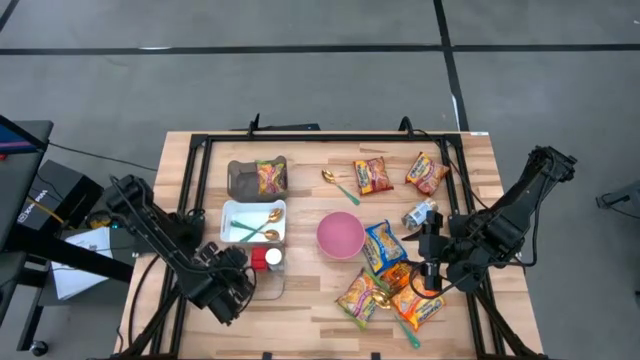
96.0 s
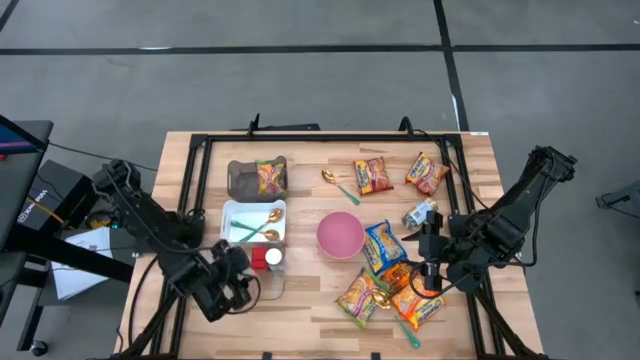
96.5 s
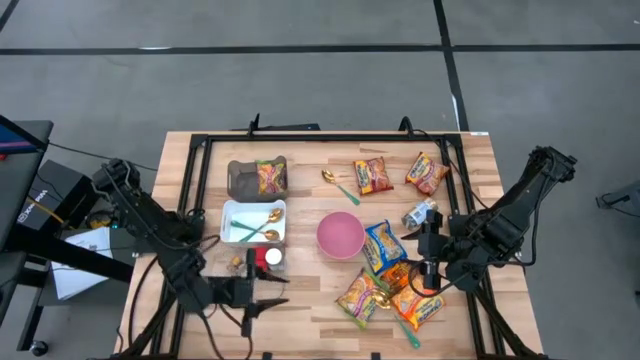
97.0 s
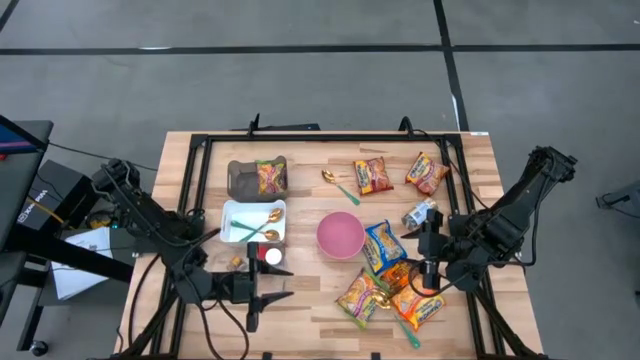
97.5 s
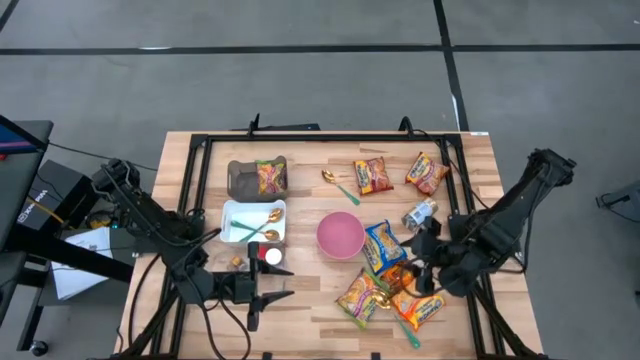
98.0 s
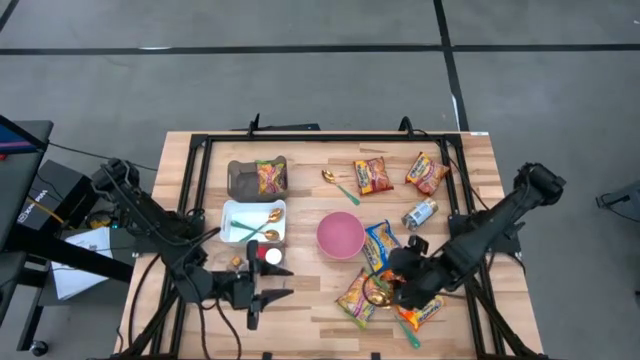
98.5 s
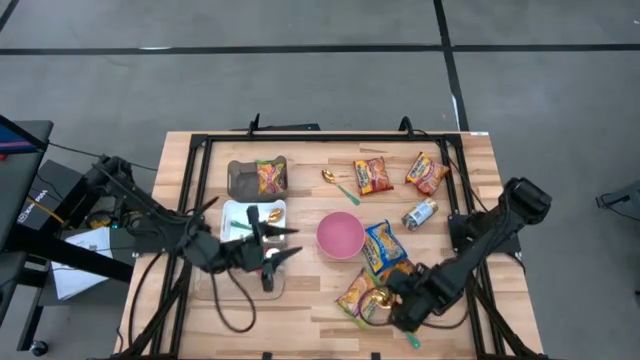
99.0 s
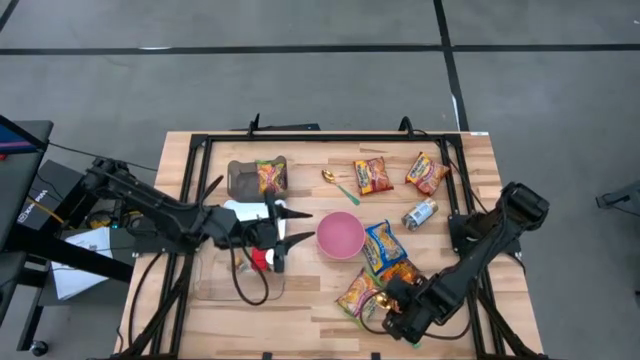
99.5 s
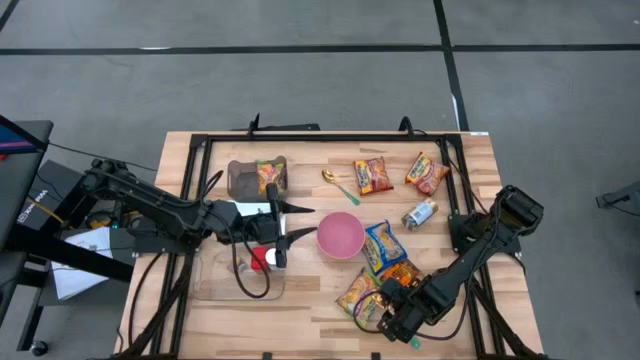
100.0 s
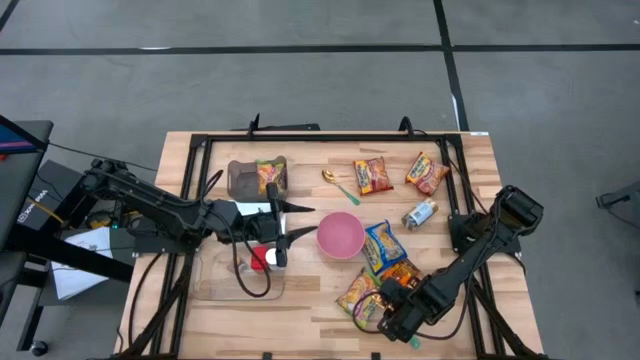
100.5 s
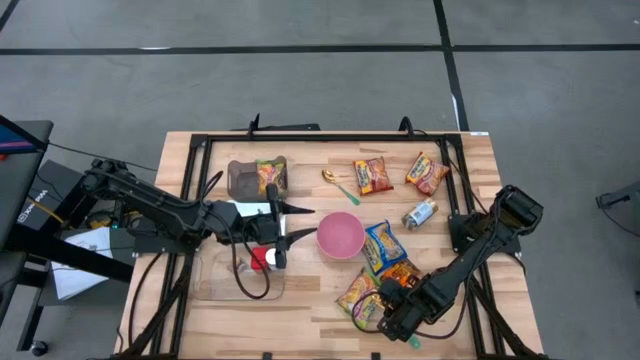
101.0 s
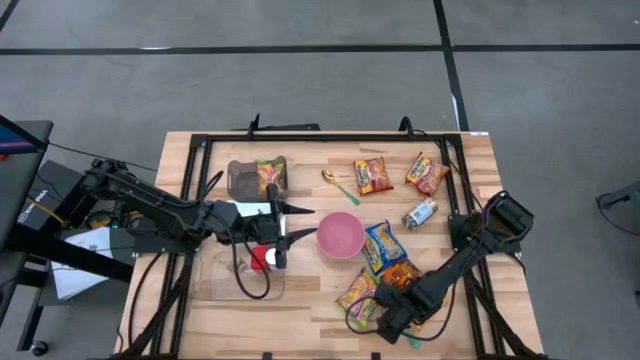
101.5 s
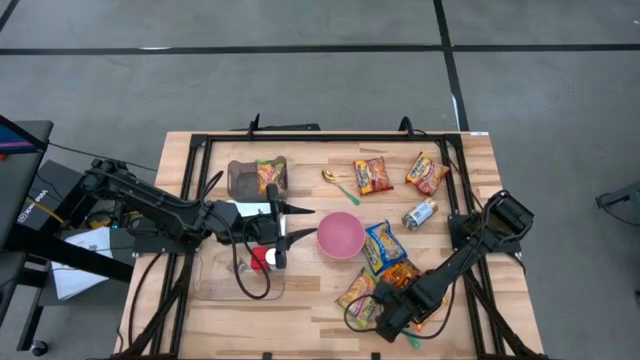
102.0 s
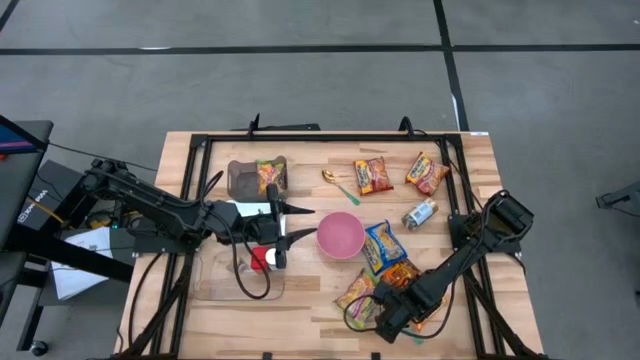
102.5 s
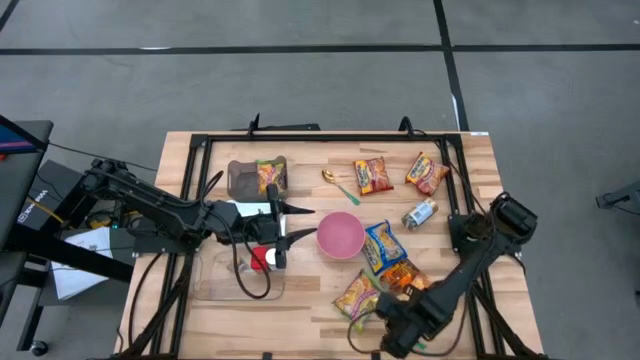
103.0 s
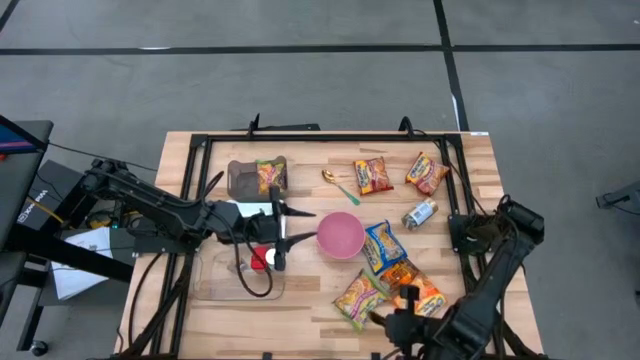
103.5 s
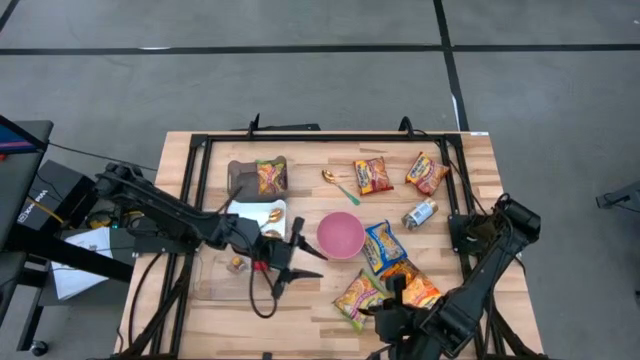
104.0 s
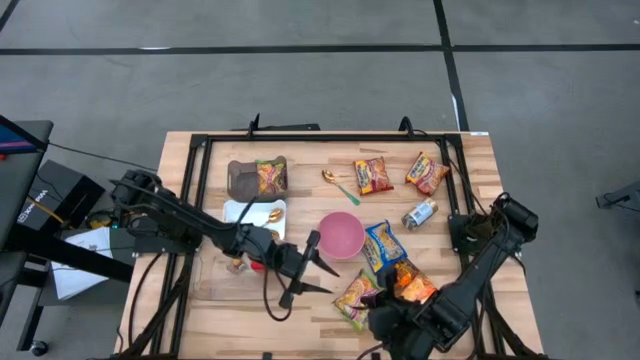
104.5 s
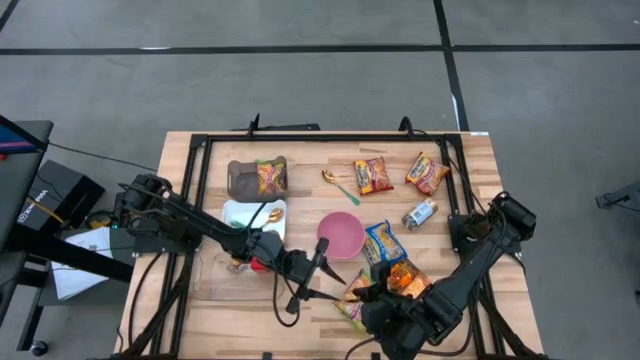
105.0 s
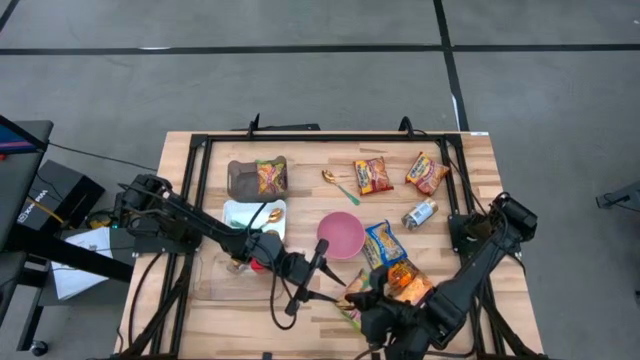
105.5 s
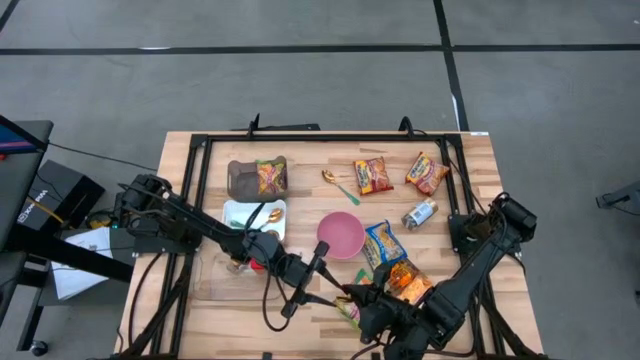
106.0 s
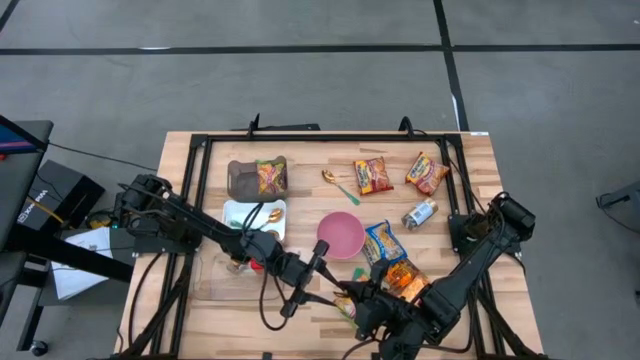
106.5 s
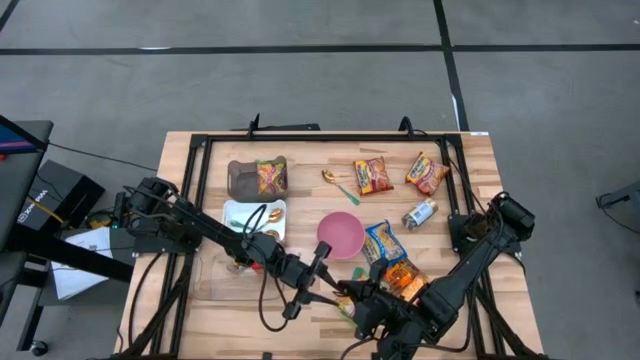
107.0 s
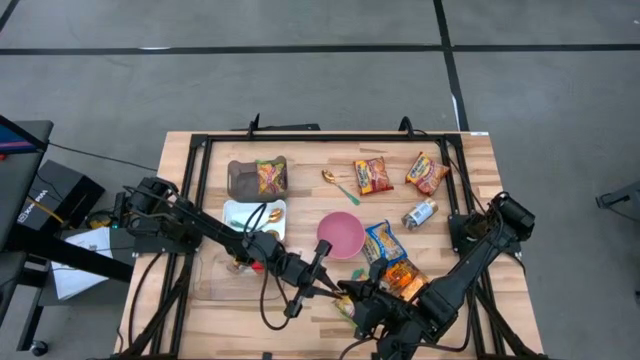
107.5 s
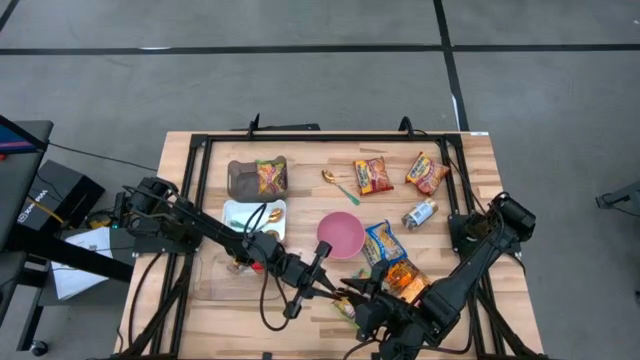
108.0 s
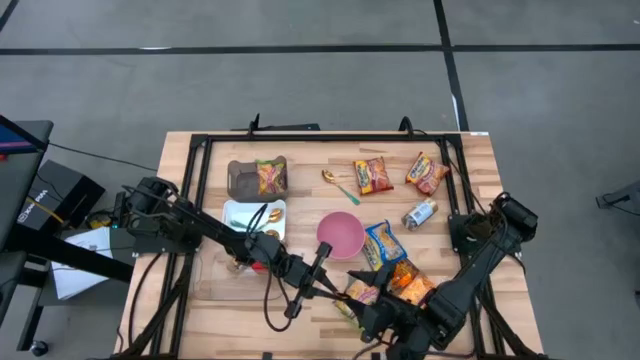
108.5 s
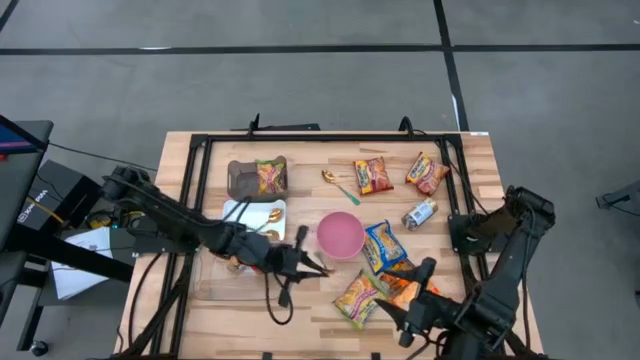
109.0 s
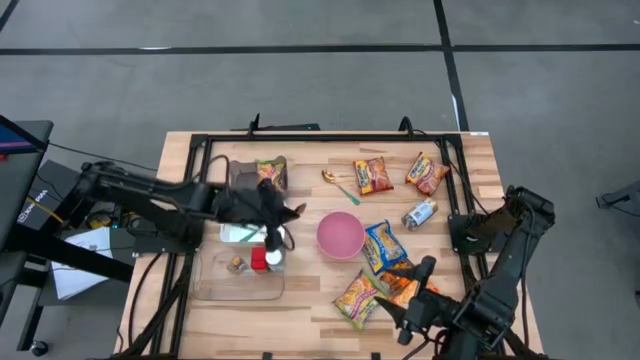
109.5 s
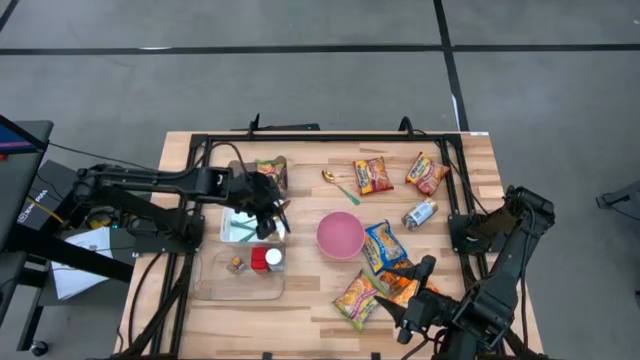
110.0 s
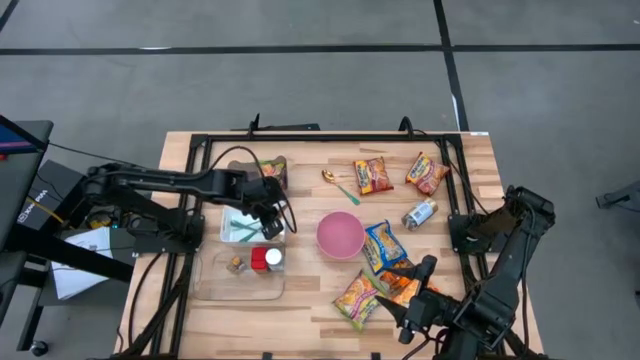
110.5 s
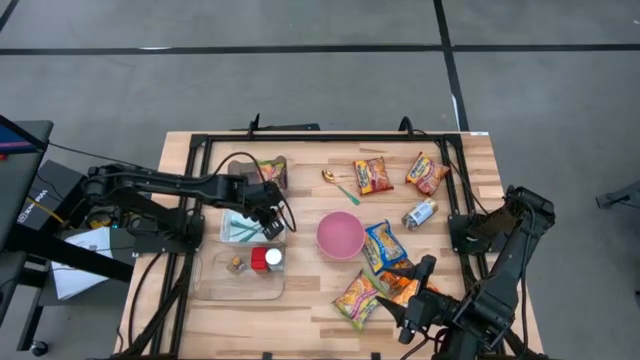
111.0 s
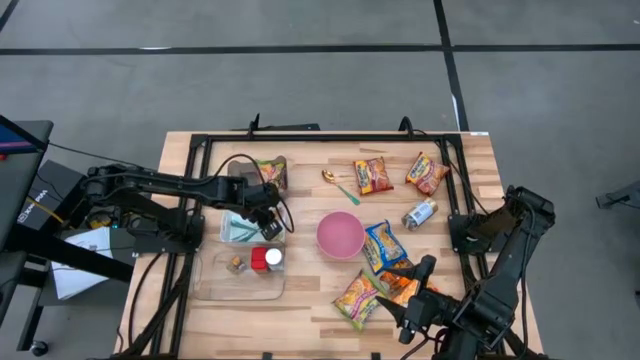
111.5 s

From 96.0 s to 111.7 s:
Task: Pick & Place Food Item
Put the green spoon into the white bin

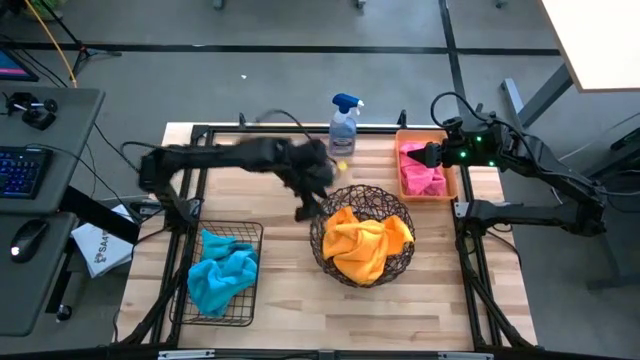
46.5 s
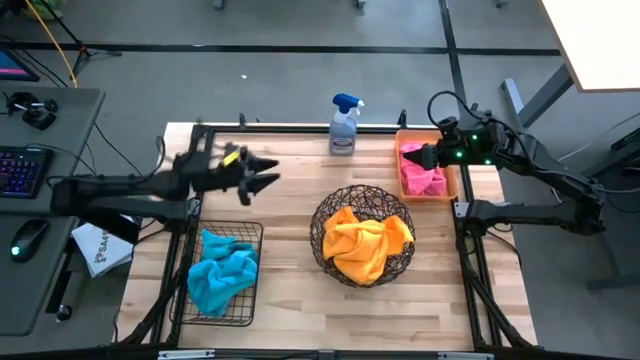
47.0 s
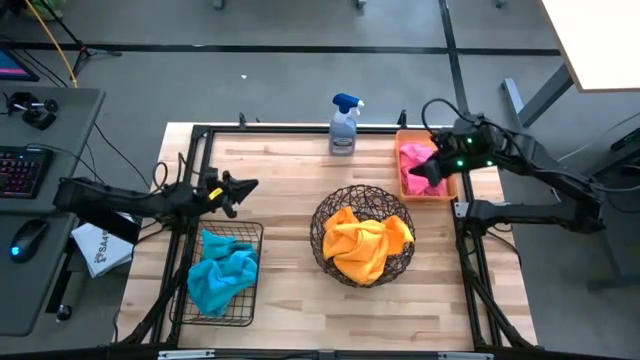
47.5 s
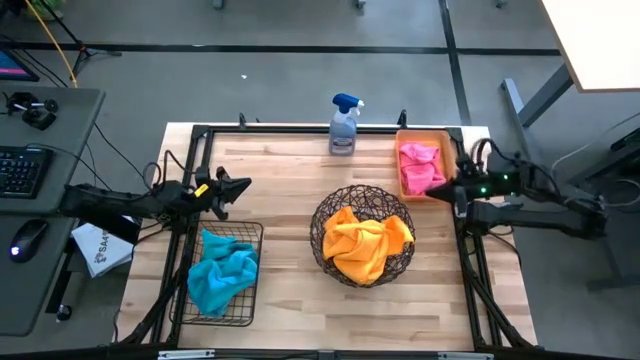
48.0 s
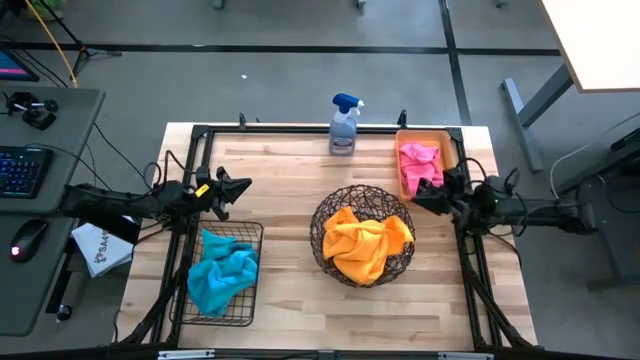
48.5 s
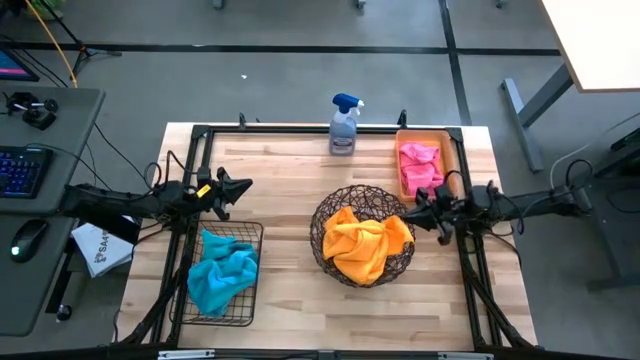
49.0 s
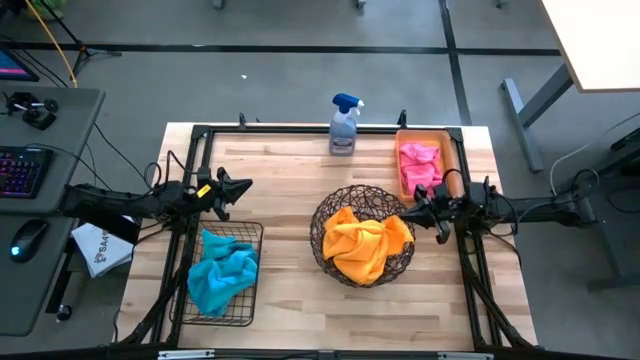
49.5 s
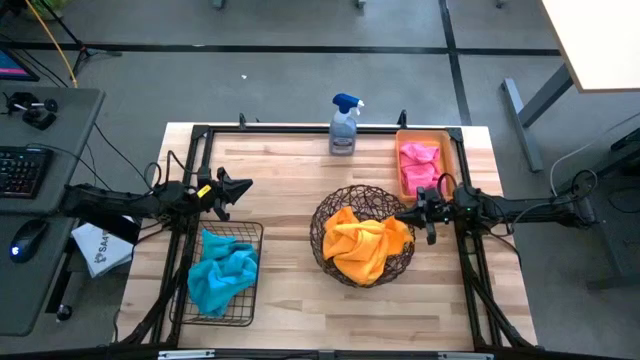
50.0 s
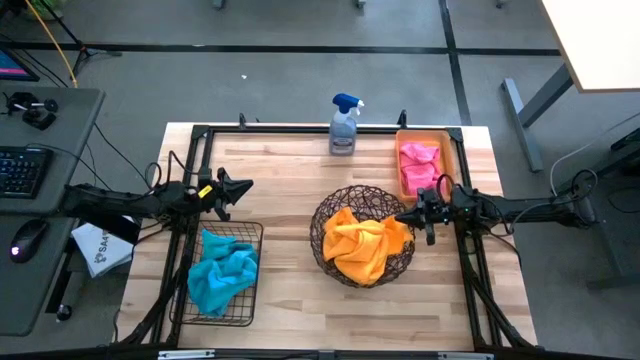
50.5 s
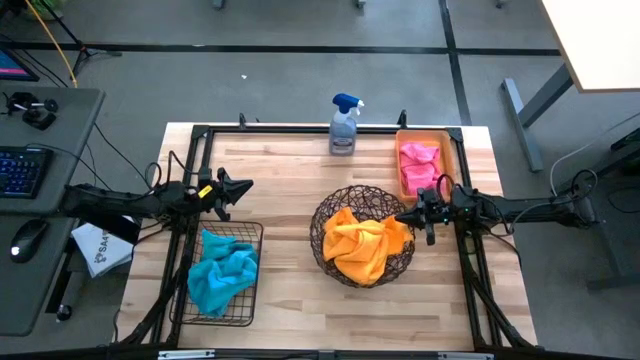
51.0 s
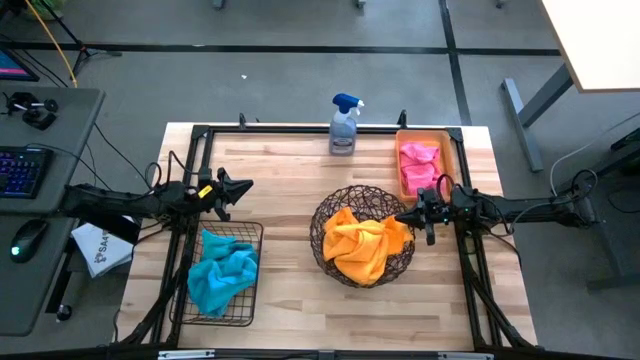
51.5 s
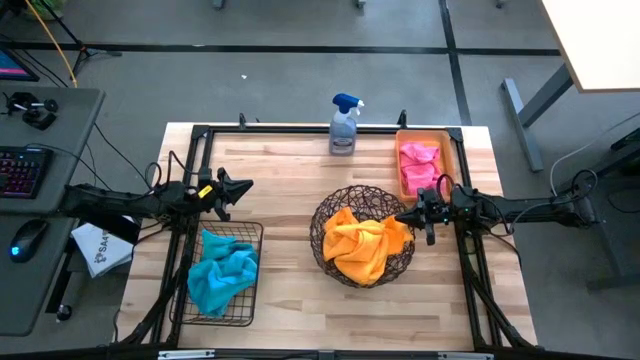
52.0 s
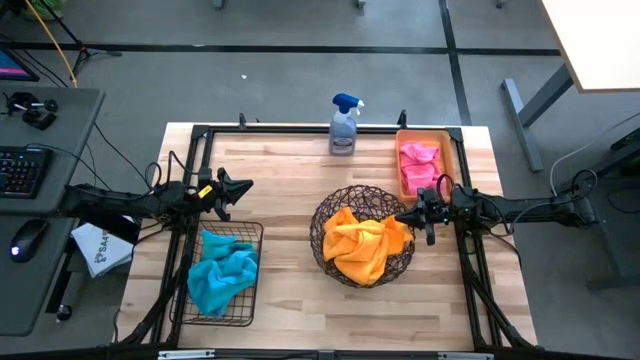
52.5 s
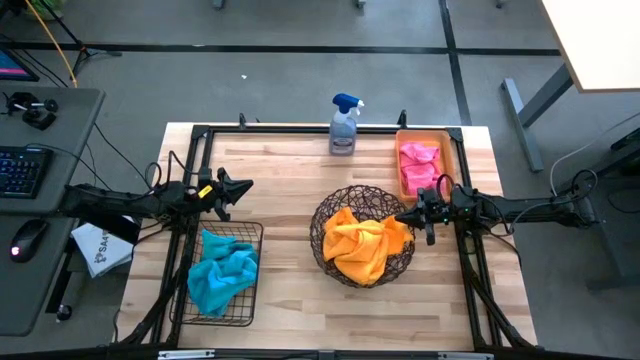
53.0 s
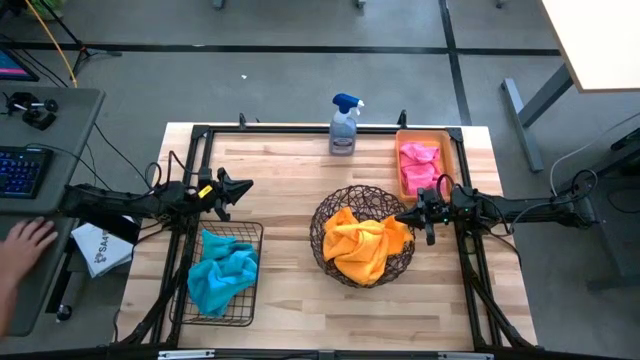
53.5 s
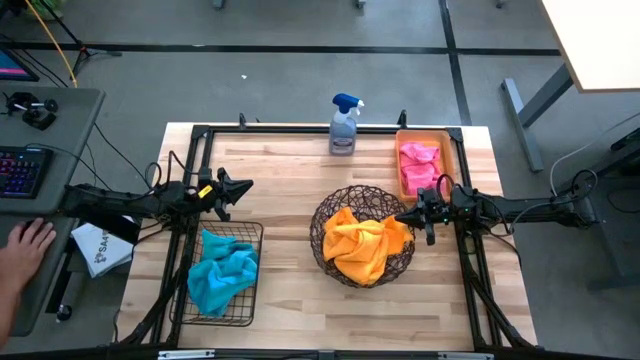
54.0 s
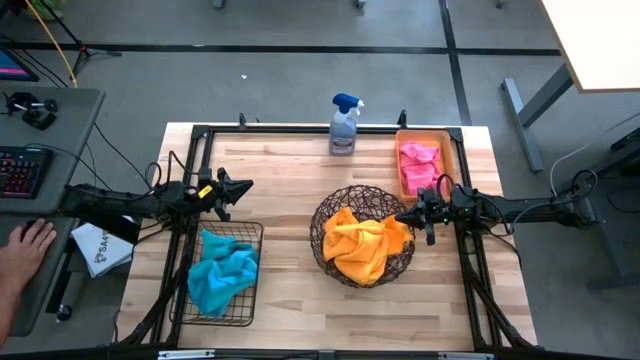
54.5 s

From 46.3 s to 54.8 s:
Task: Sort microfiber towel by color & place in baskets
Return to Home Position
